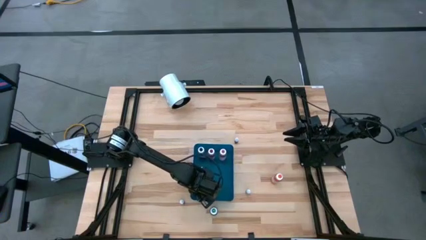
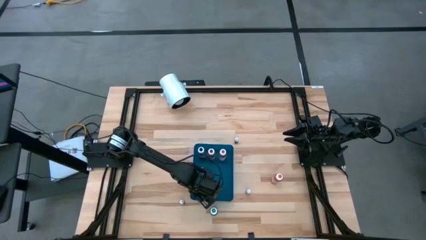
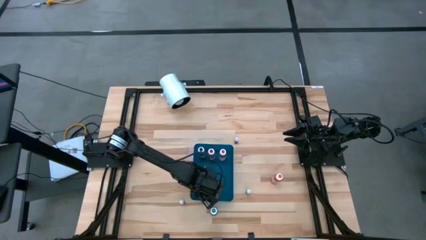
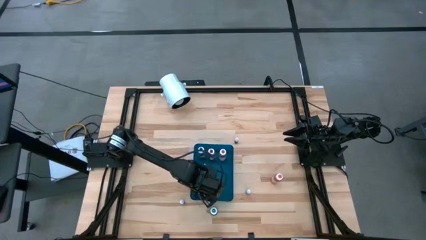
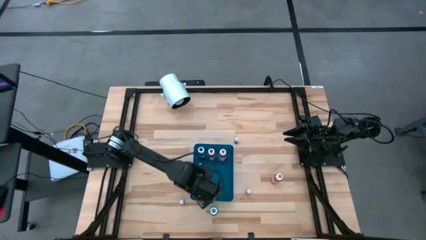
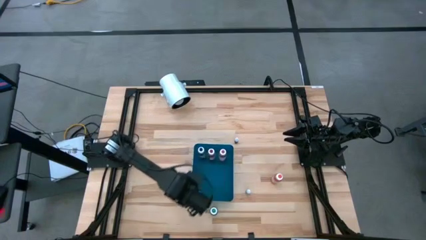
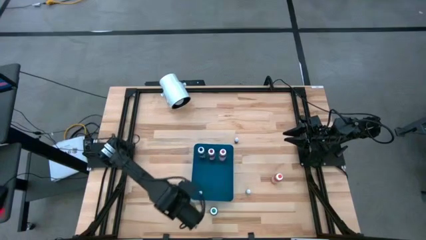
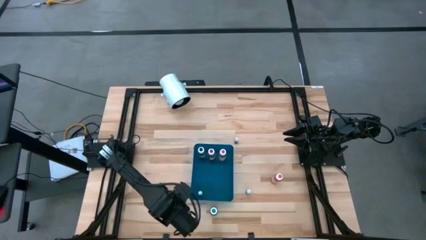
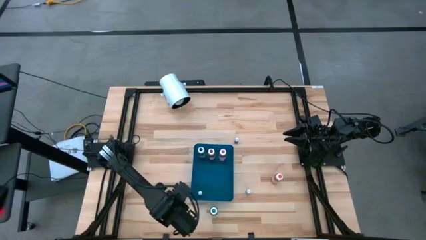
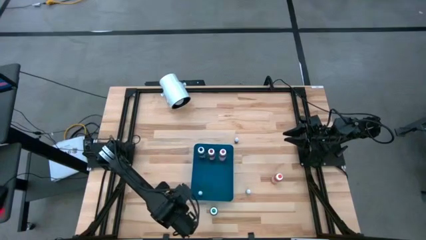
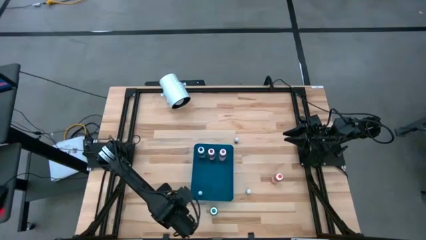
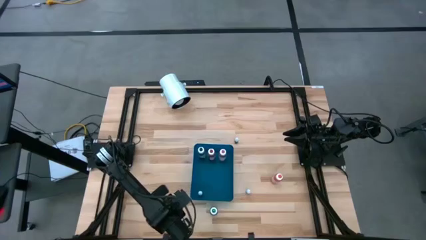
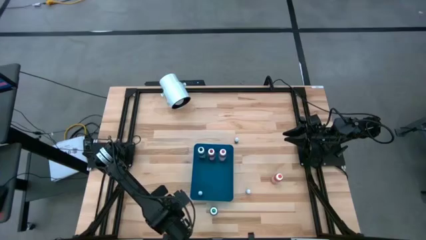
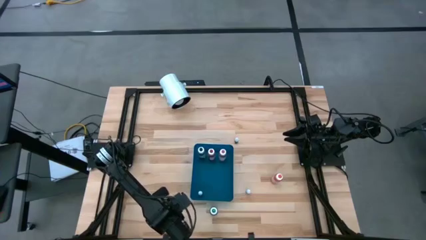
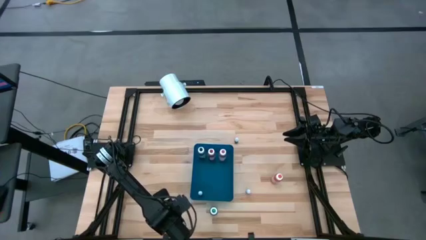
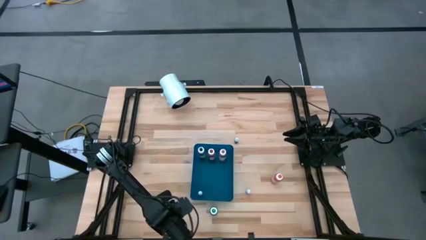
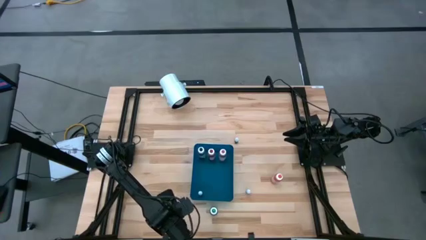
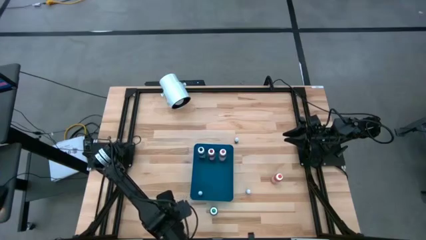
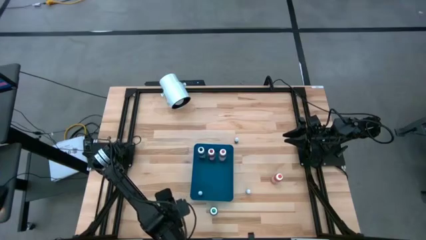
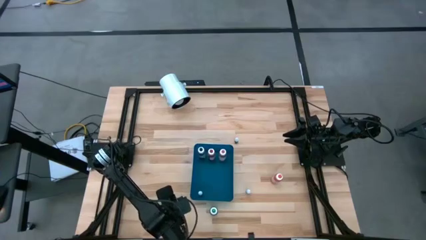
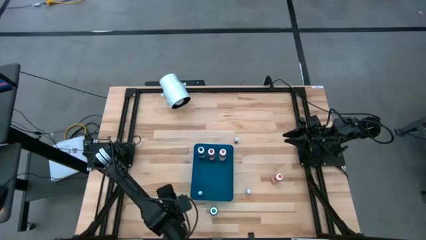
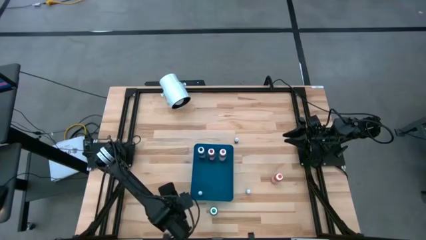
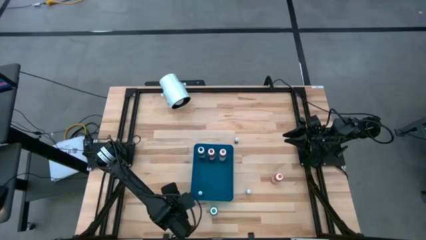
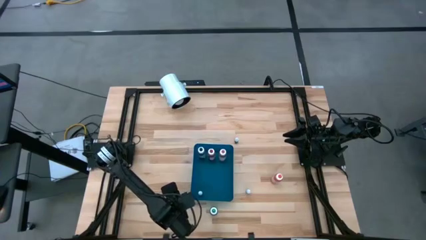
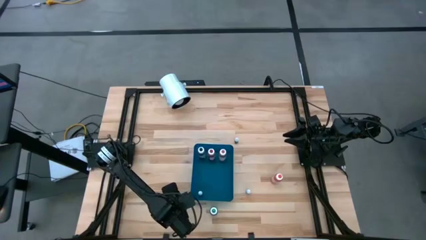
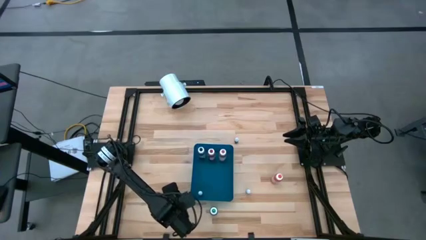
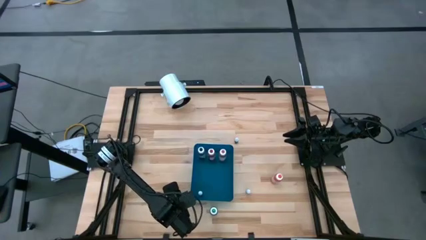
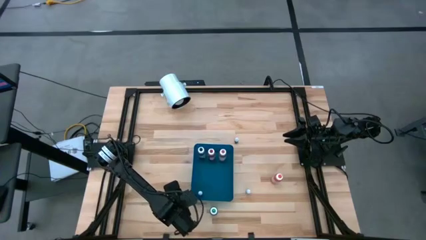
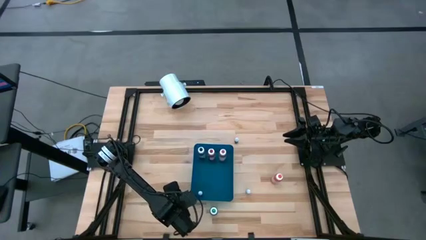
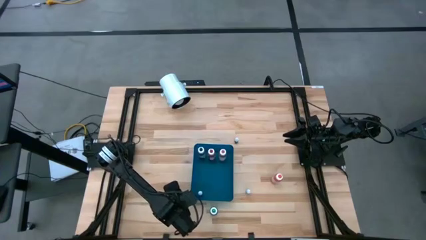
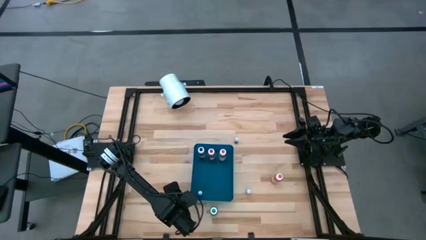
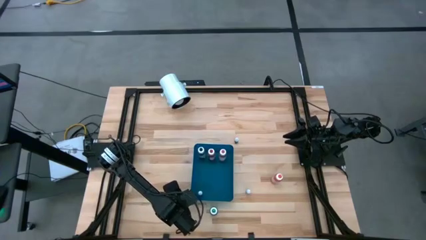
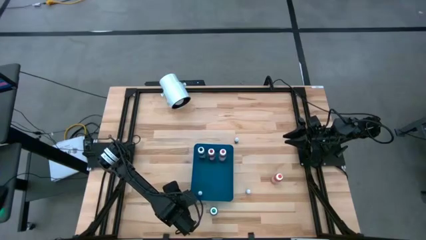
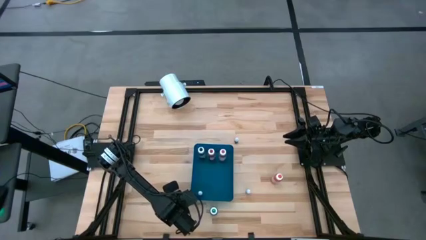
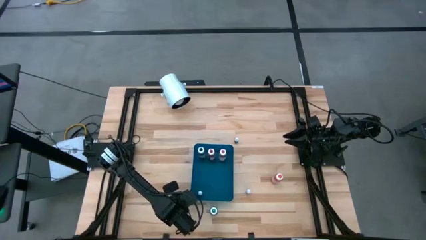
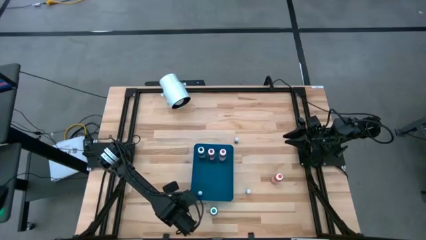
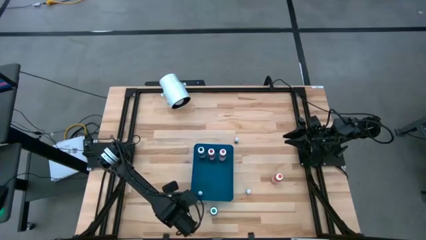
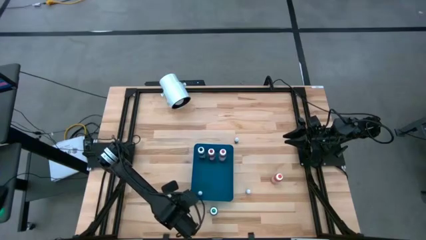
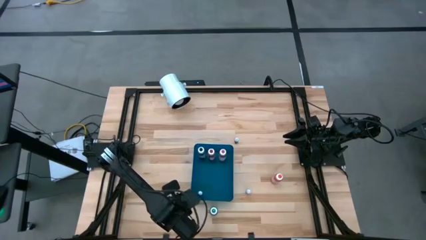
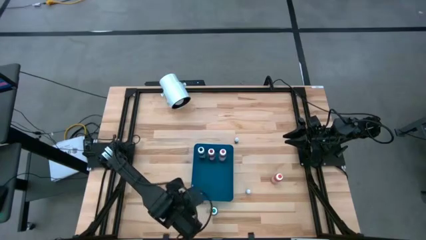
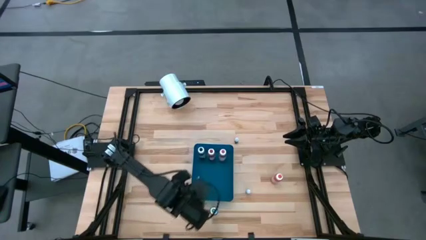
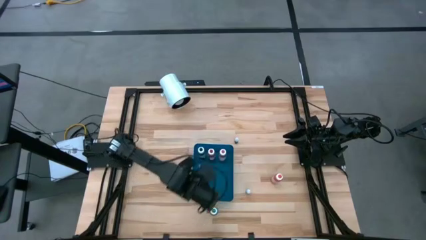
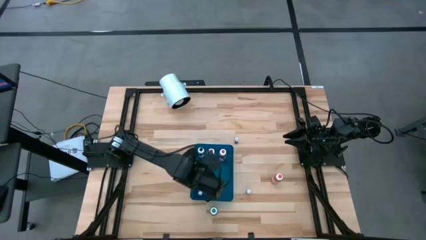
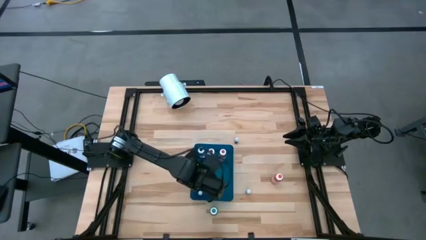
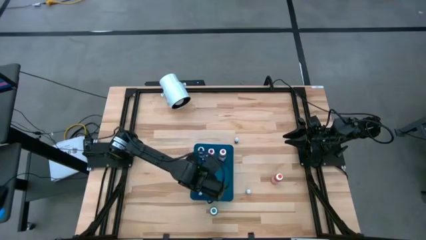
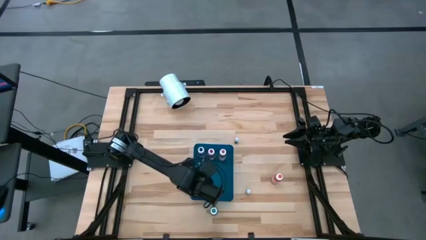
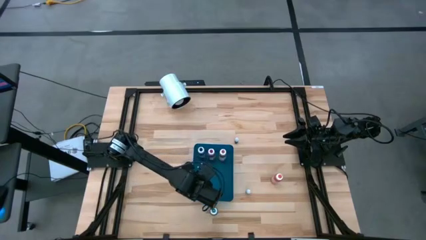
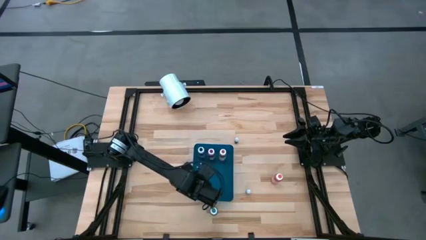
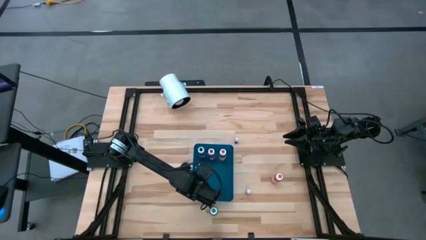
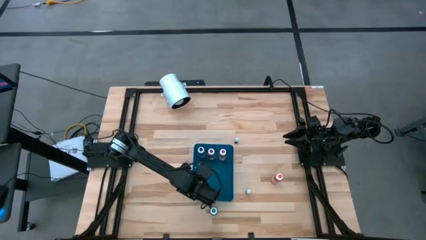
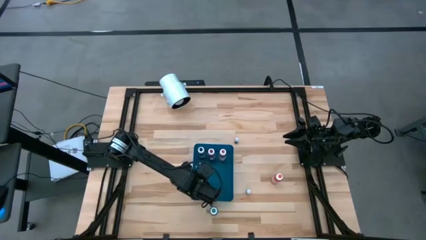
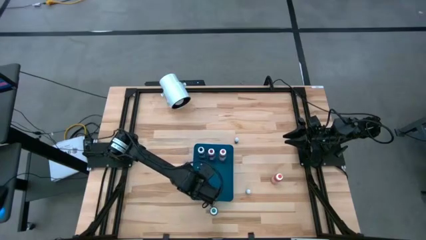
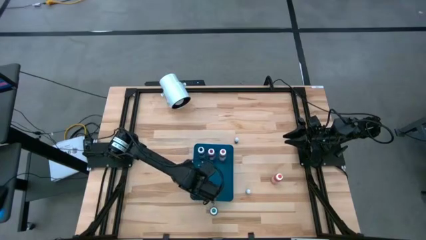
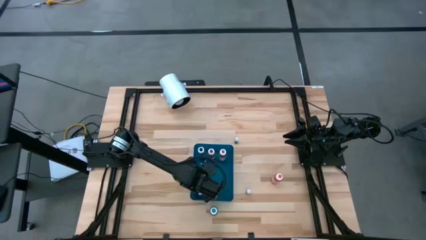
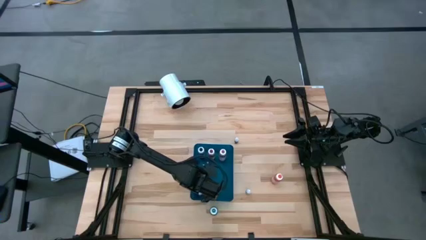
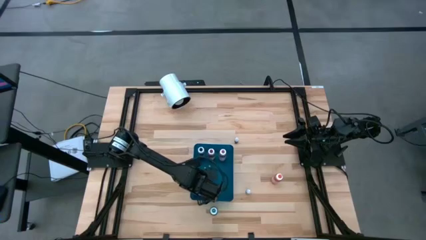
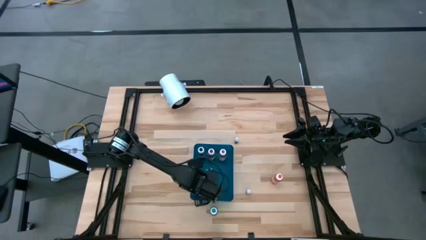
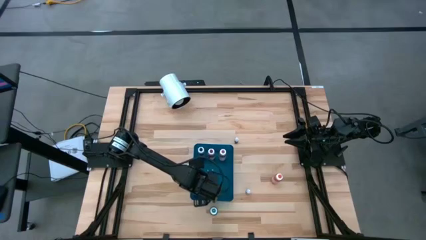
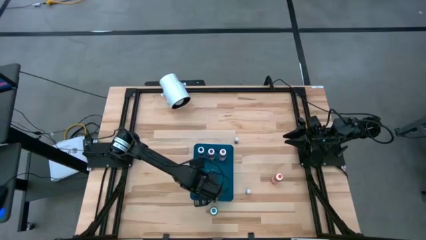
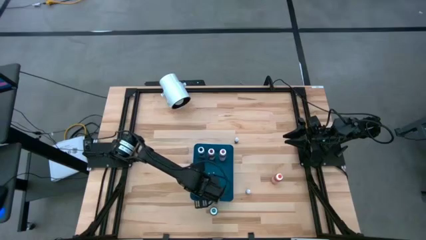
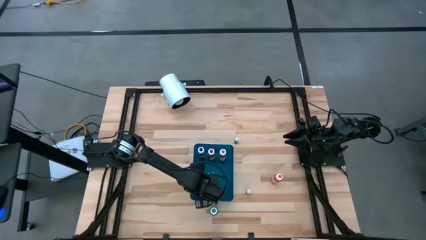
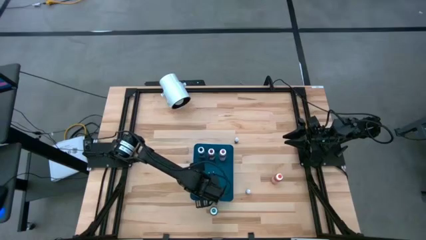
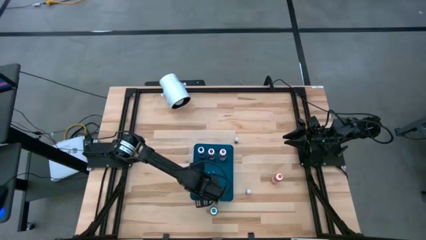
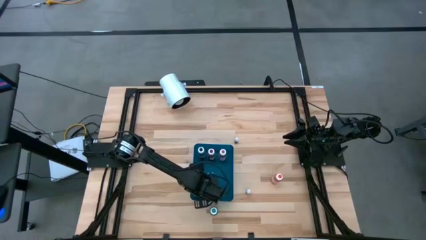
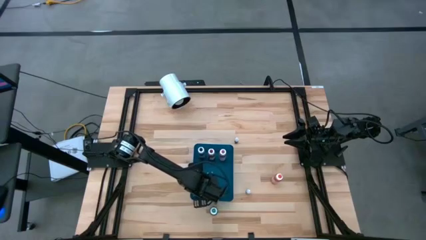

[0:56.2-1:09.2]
Task: Pick & Place food coloring
Put the small black food coloring bottle into the blue bin
